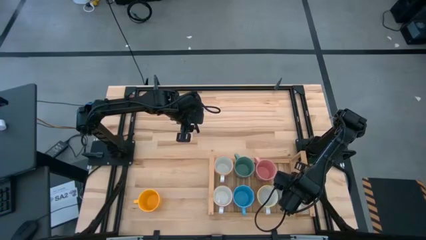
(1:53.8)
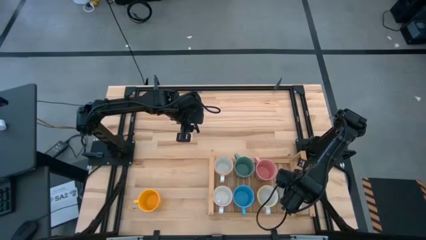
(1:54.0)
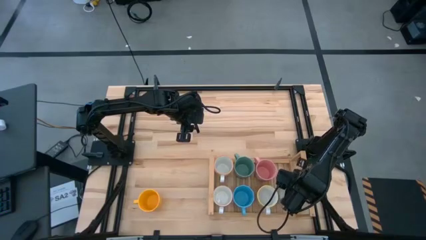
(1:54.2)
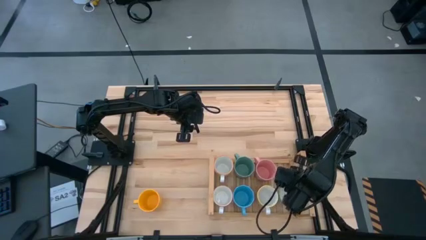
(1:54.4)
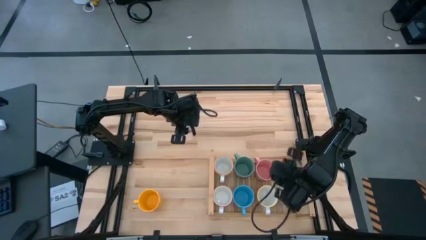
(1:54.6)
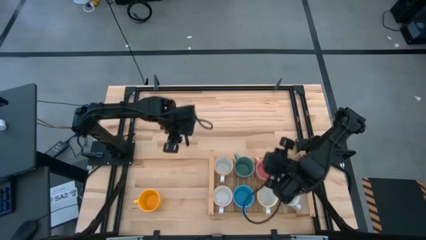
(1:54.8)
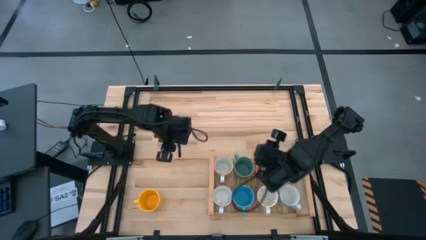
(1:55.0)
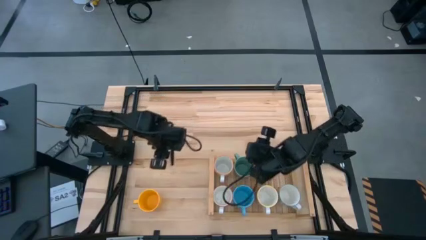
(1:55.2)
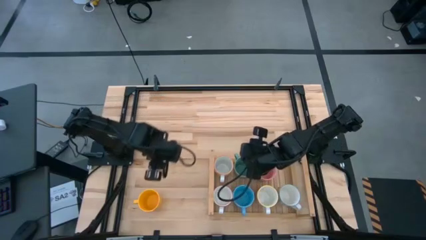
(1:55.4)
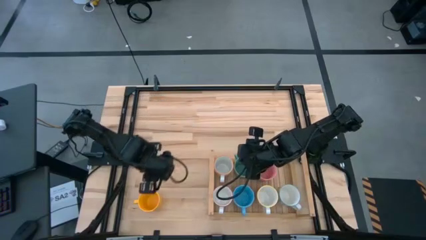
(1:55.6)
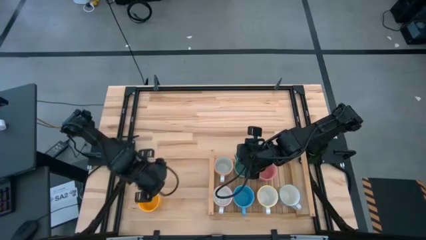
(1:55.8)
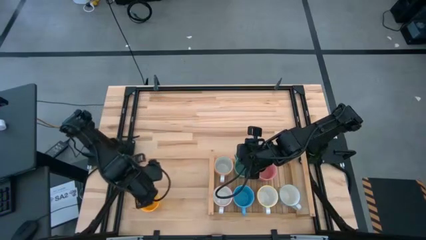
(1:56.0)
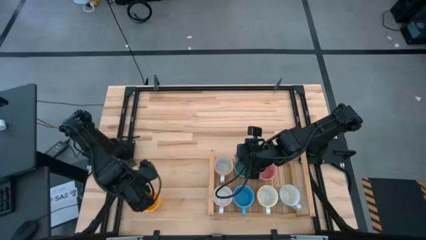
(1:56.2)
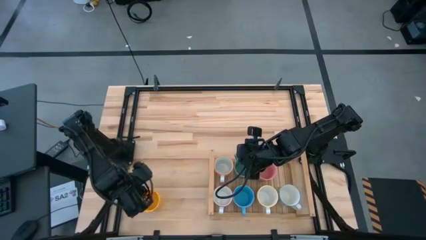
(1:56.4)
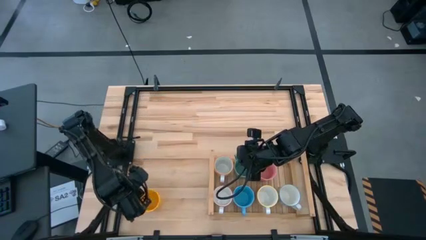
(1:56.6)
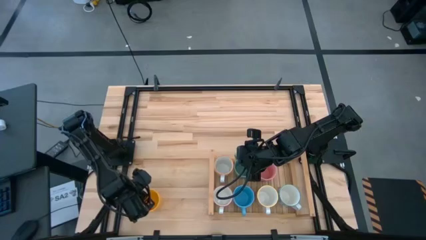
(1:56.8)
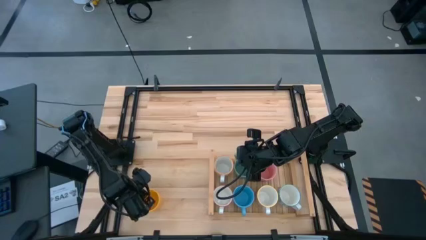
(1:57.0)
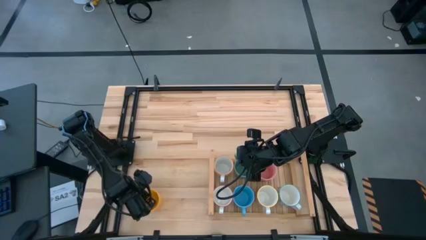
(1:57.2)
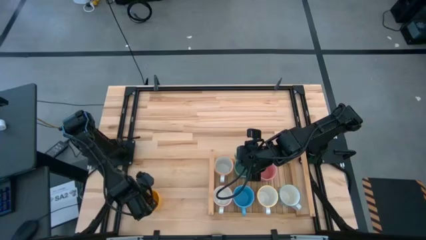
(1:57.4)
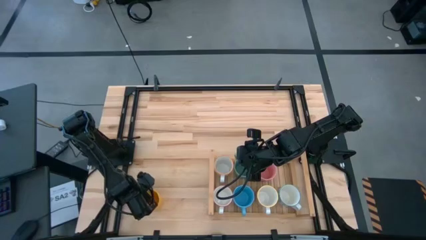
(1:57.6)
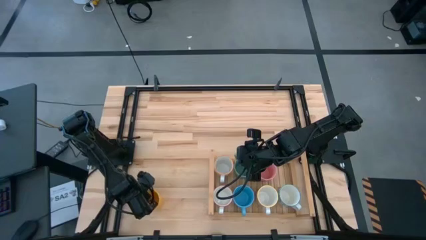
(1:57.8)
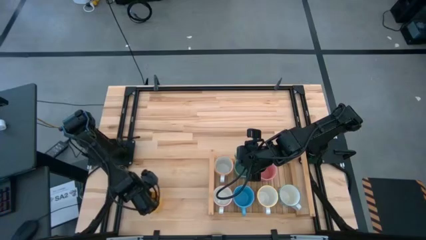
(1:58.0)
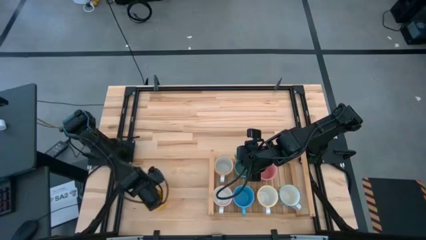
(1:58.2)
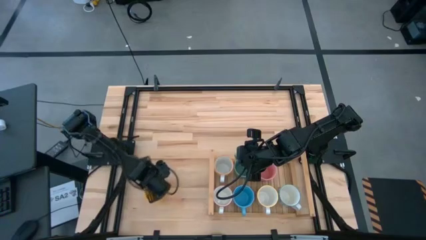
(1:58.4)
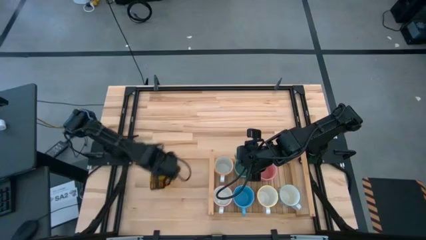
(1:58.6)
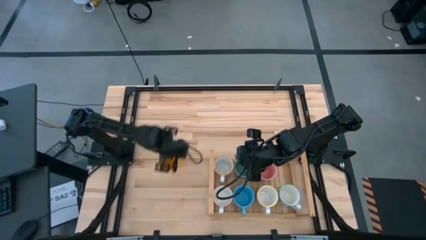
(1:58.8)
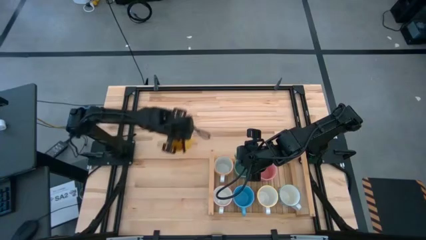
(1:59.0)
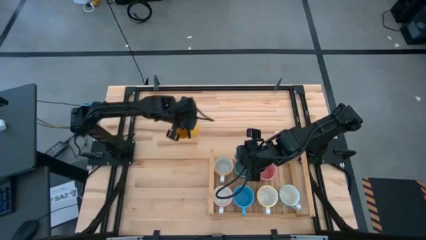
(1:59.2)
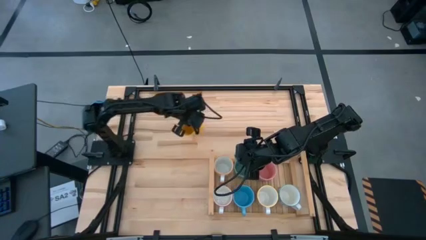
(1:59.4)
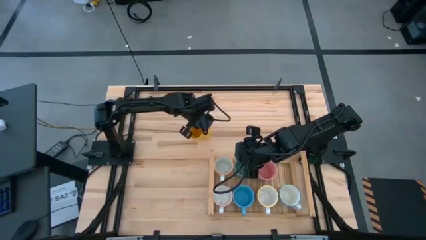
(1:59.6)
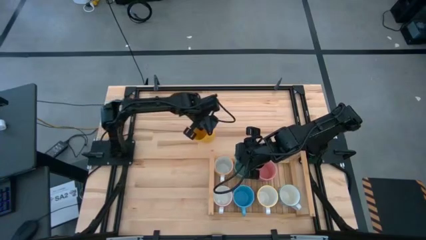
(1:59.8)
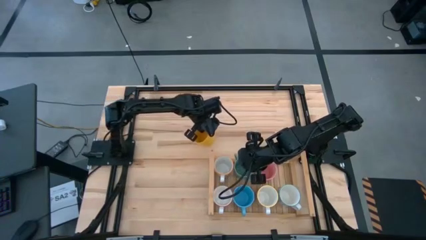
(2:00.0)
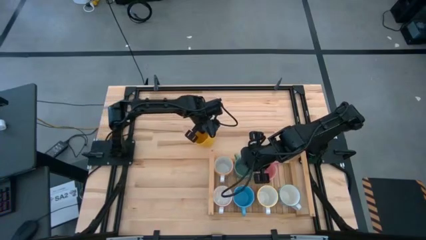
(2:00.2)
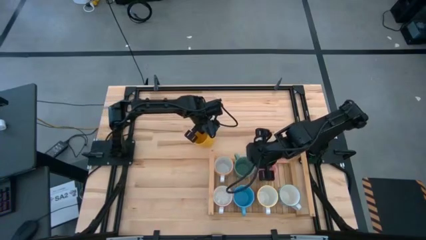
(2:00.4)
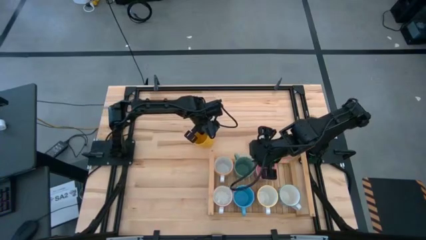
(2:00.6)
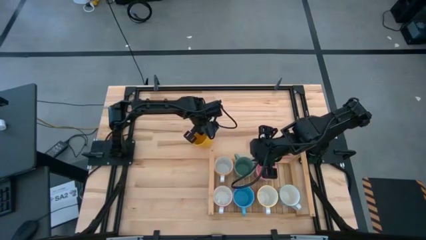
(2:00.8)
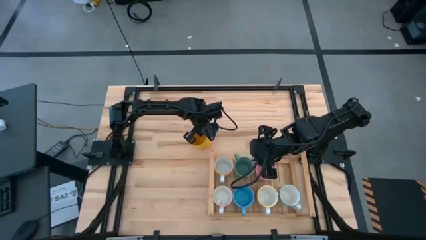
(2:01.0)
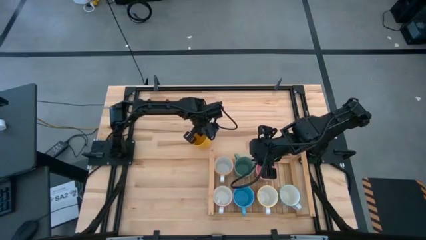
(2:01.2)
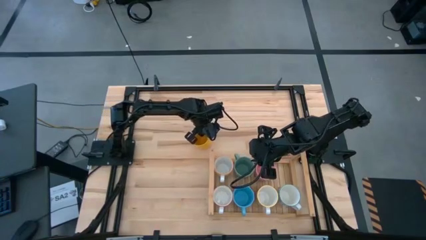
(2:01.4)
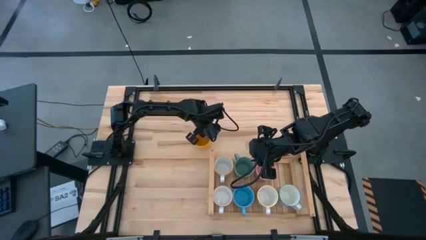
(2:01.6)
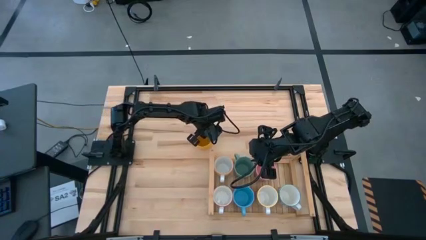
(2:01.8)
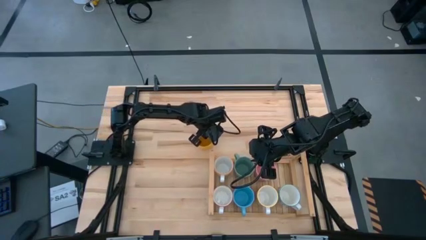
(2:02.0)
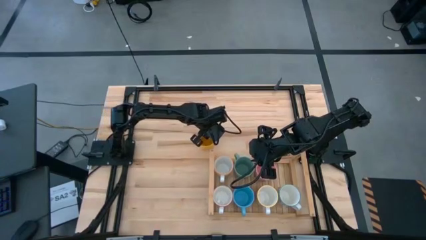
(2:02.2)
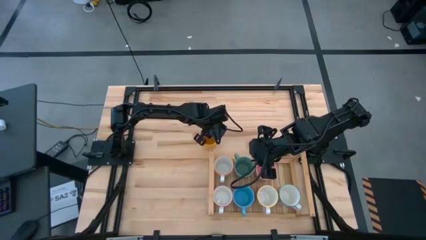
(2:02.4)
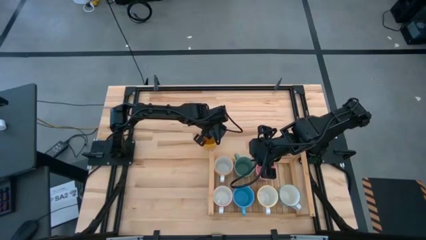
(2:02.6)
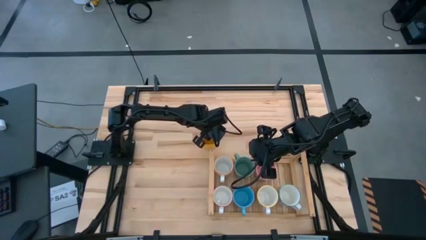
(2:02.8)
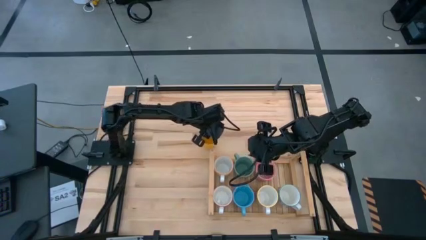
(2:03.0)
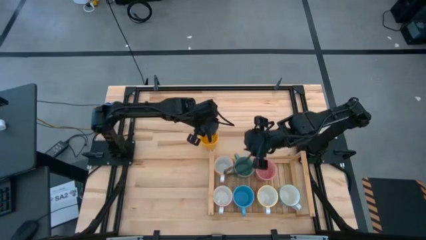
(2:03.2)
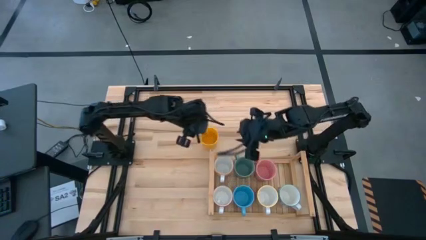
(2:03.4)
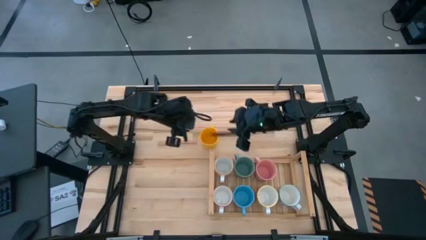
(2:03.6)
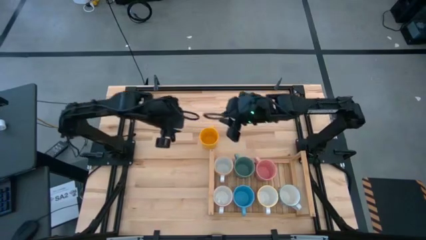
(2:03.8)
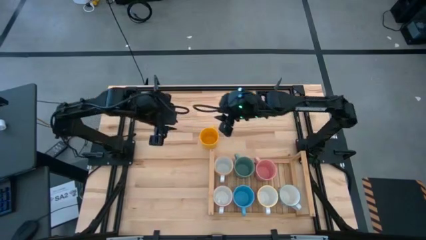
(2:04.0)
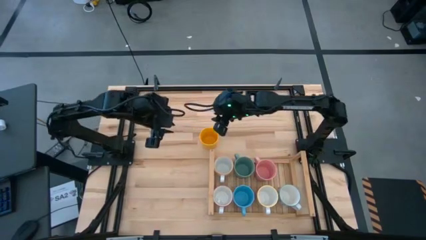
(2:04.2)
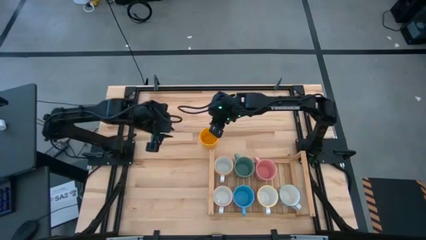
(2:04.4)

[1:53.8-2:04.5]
Task: Place coffee mugs
Put the yellow mug on the shelf

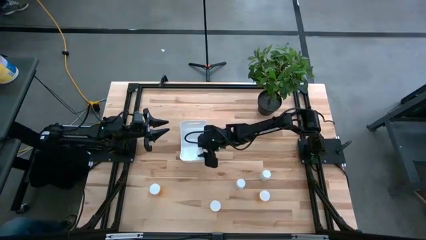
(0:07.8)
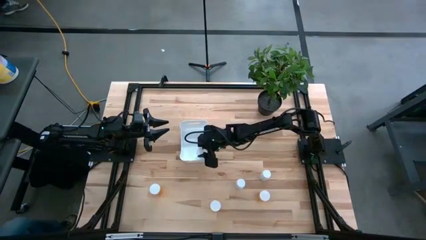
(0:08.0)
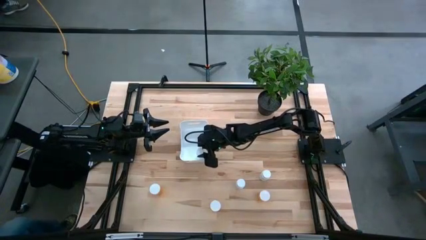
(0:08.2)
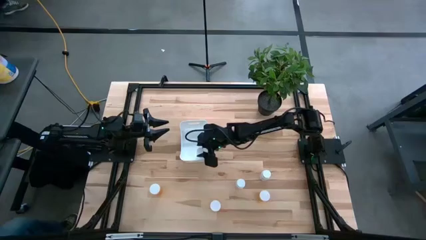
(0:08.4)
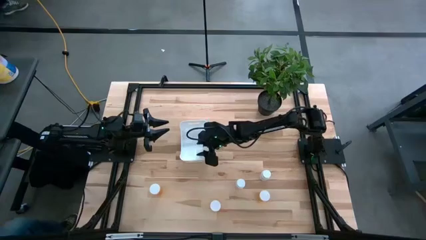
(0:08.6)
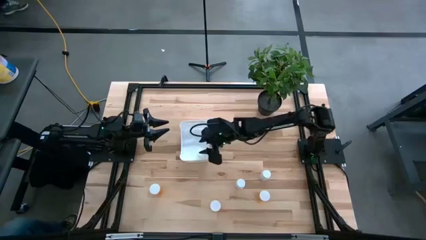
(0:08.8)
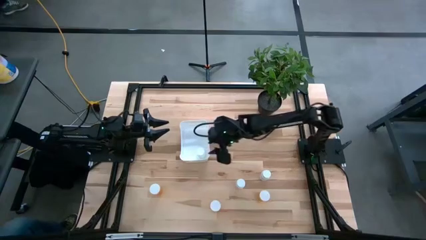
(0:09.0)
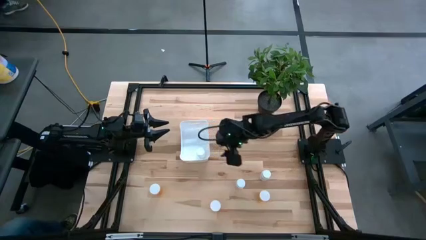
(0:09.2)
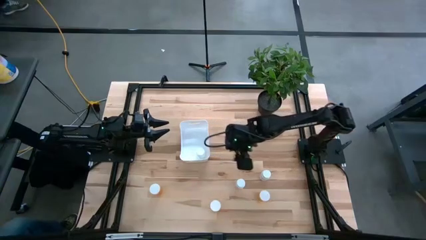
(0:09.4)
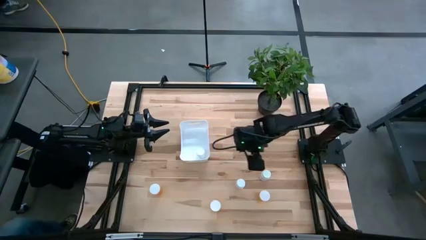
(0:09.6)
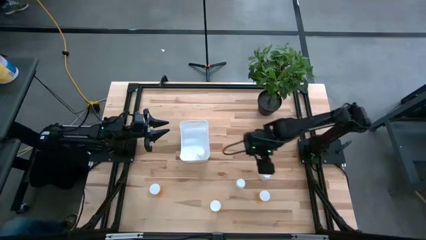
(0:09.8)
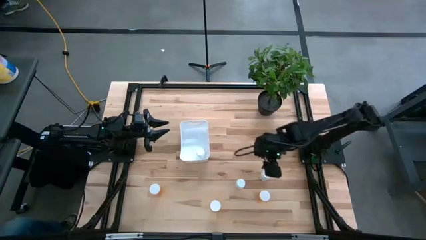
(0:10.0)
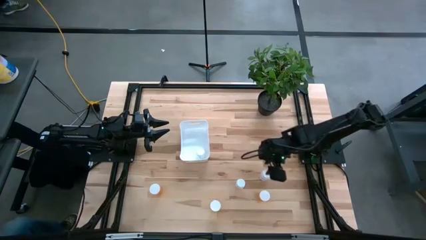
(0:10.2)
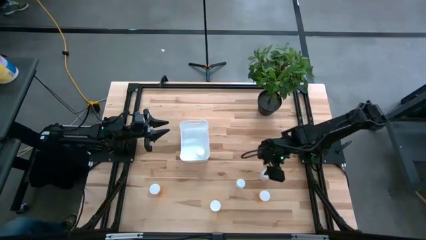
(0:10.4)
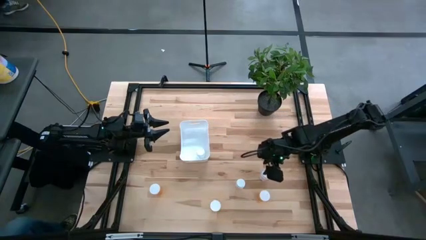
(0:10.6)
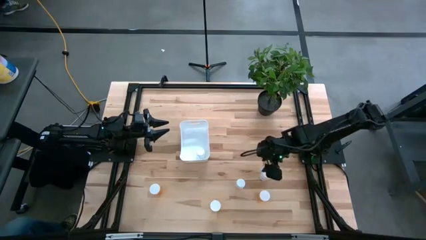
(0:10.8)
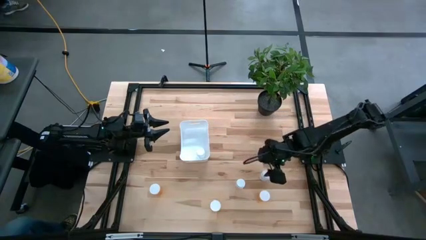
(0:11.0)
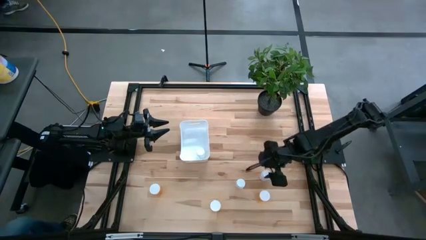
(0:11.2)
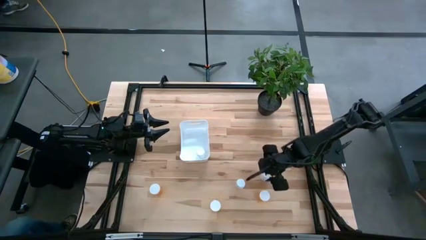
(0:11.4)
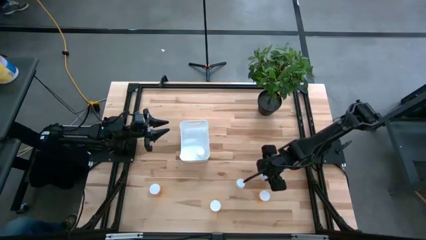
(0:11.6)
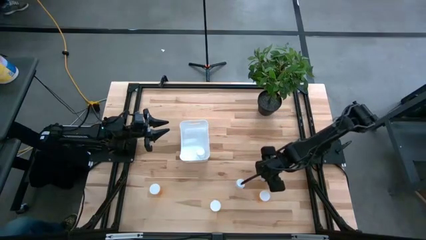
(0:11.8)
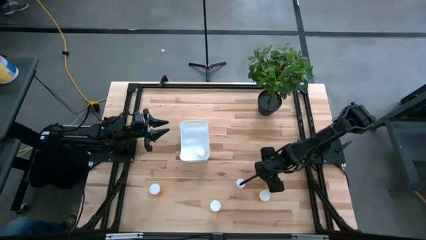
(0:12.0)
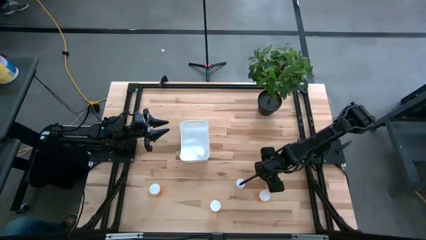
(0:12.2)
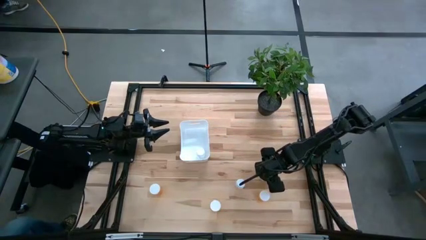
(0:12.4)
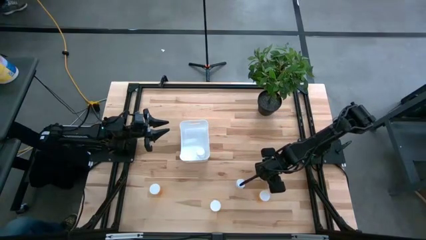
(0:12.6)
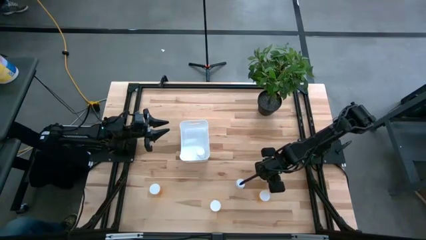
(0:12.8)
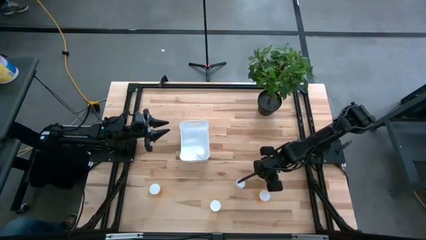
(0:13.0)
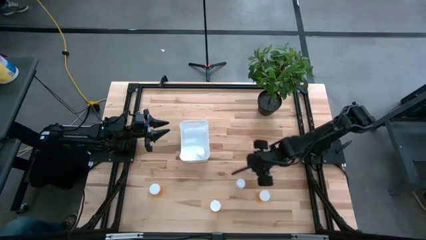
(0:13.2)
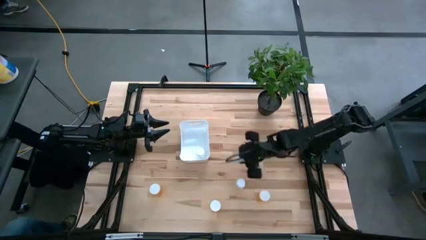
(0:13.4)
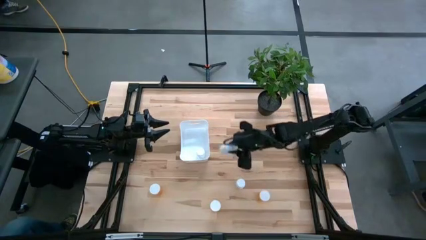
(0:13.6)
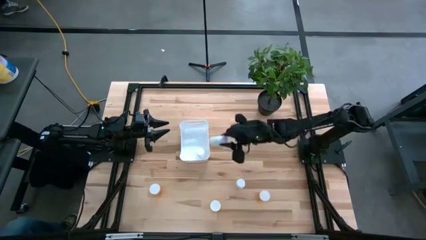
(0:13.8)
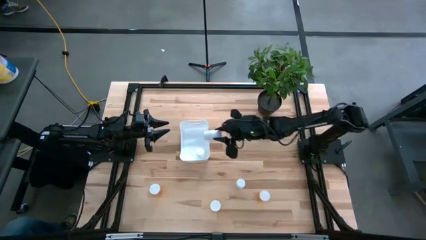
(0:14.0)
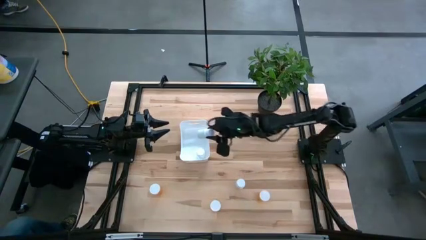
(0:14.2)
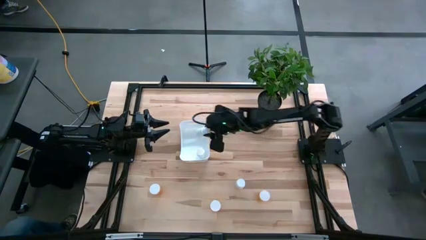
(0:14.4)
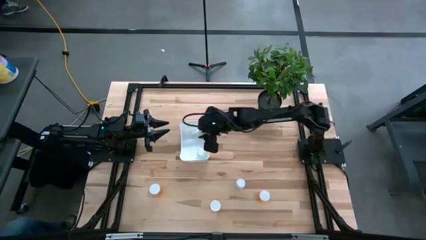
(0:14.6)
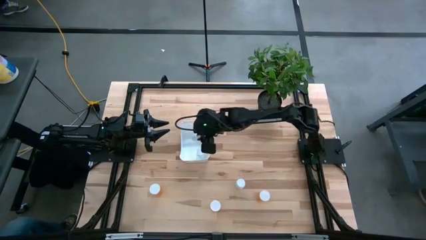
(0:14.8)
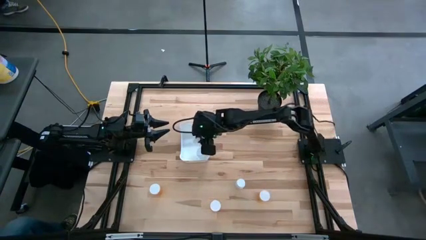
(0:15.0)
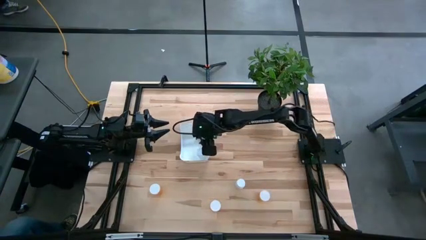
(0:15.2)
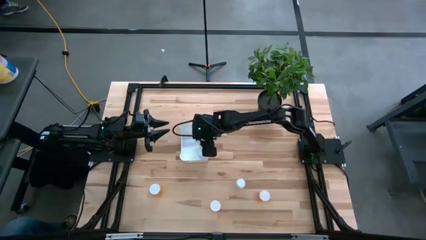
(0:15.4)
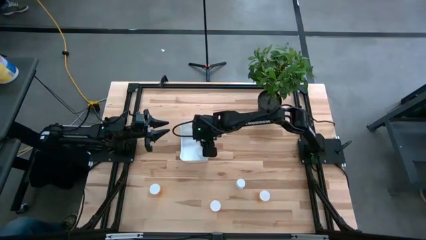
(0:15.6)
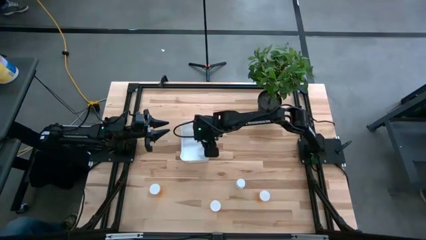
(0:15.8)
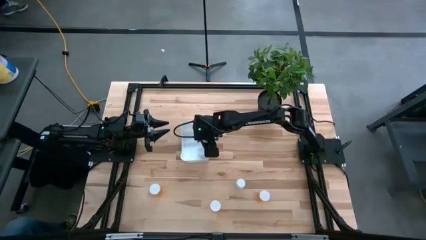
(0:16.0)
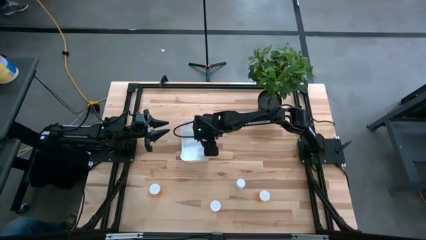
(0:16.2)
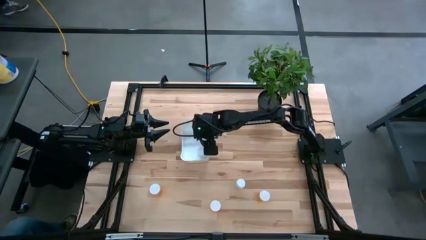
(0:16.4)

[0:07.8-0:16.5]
Task: Pick and place pill bottles into a basket
Put the right white pill bottle into the white bin
